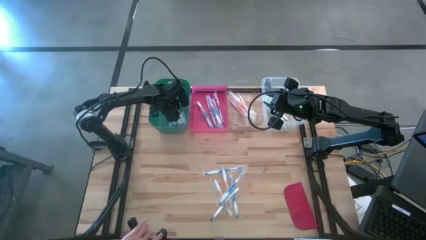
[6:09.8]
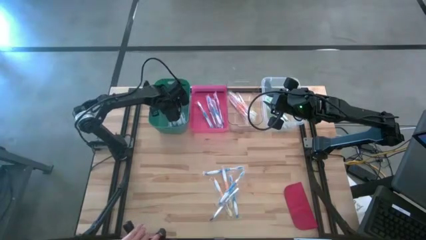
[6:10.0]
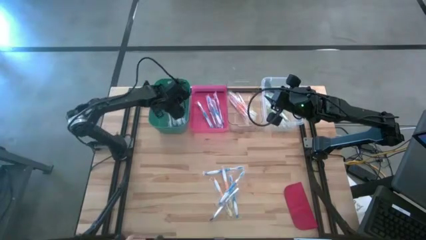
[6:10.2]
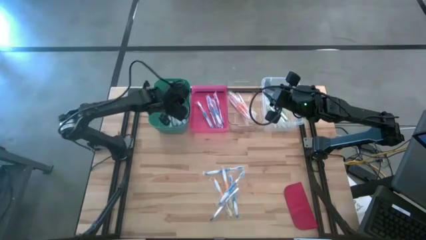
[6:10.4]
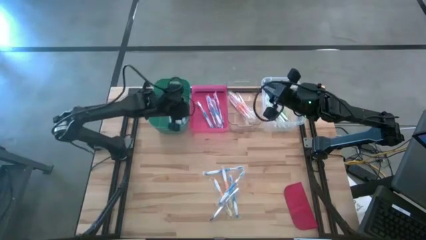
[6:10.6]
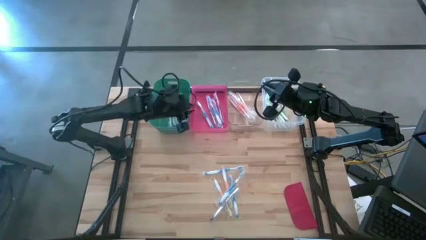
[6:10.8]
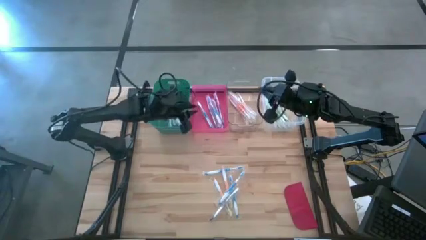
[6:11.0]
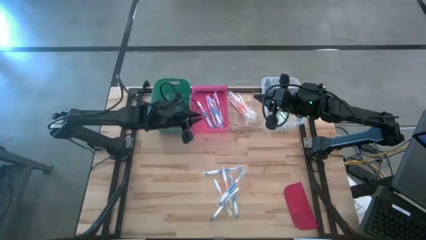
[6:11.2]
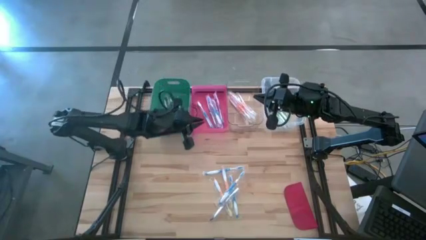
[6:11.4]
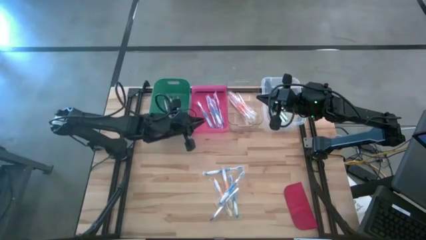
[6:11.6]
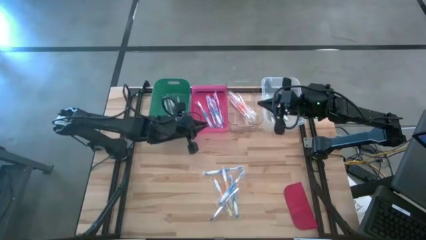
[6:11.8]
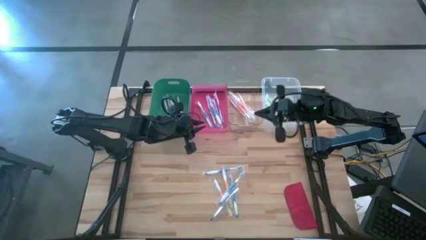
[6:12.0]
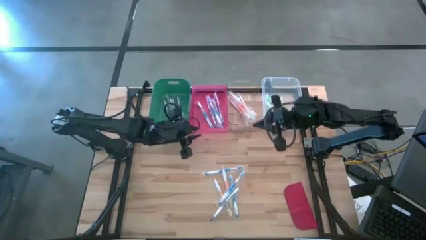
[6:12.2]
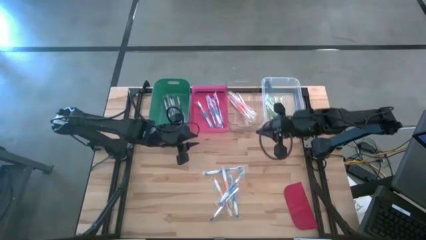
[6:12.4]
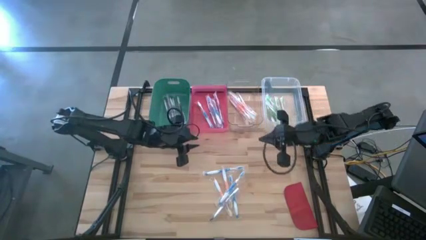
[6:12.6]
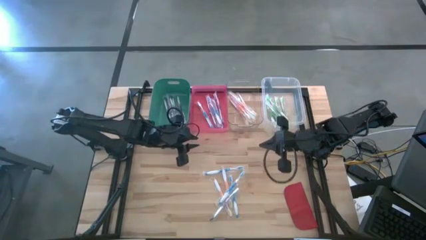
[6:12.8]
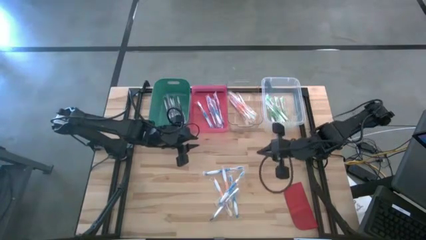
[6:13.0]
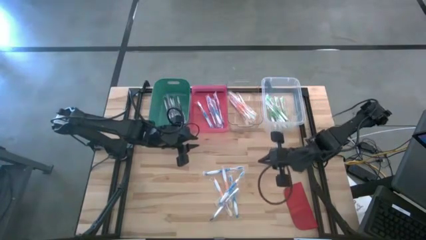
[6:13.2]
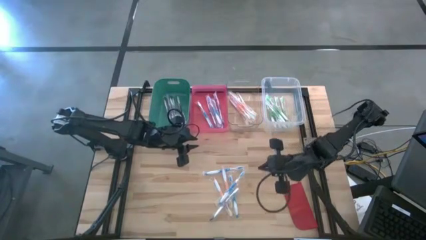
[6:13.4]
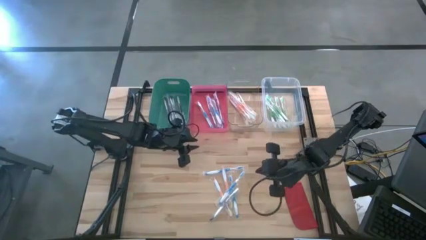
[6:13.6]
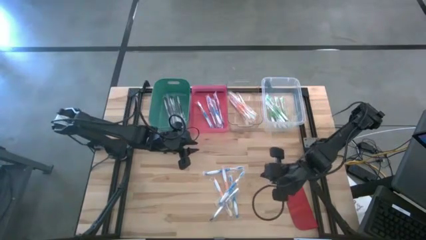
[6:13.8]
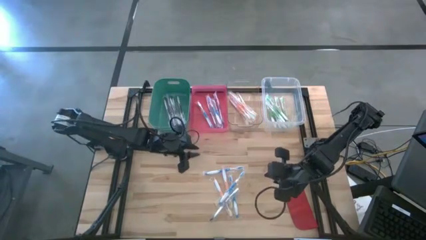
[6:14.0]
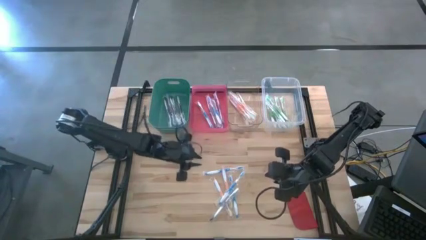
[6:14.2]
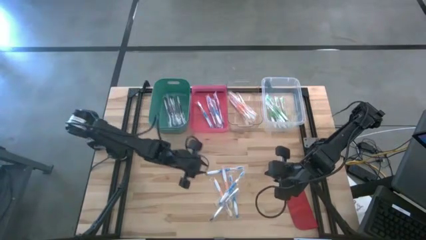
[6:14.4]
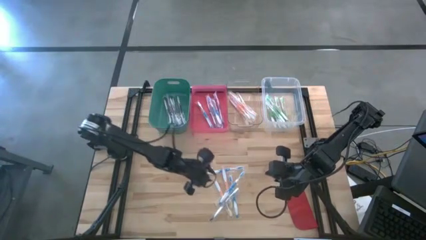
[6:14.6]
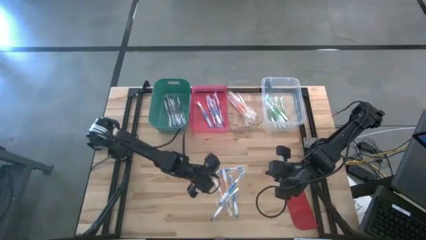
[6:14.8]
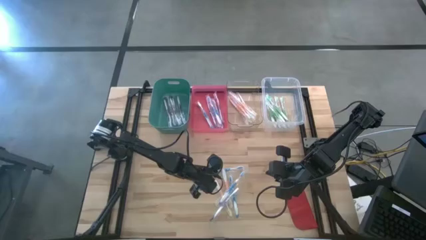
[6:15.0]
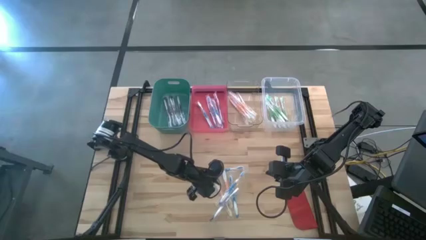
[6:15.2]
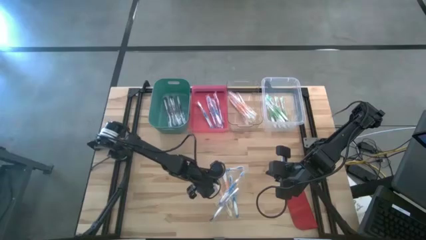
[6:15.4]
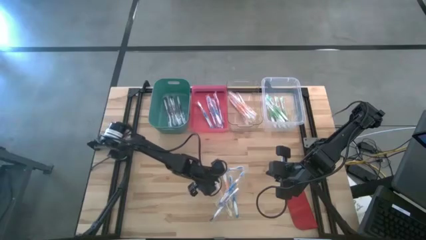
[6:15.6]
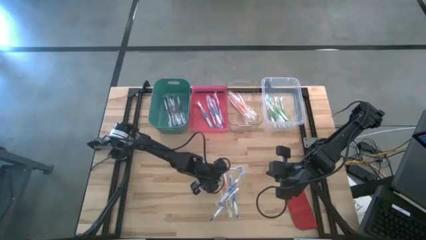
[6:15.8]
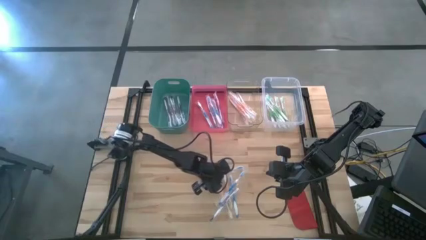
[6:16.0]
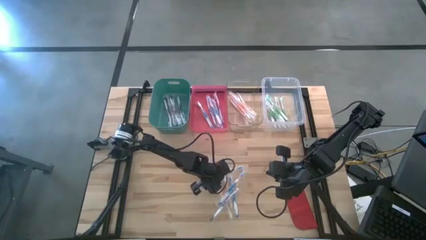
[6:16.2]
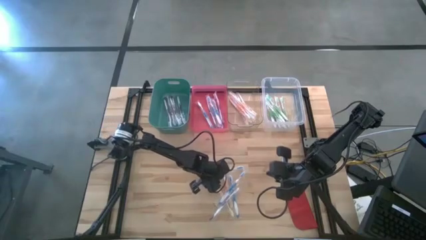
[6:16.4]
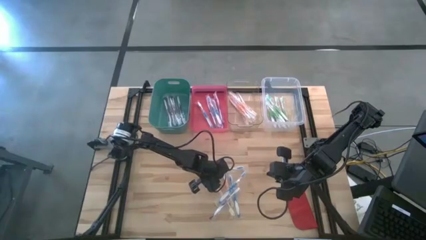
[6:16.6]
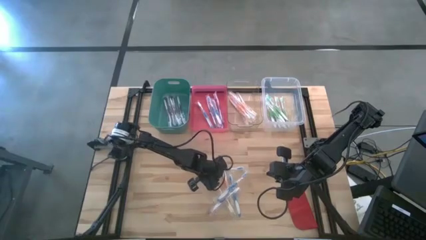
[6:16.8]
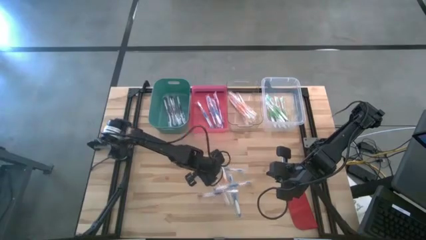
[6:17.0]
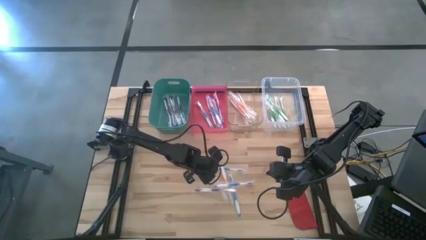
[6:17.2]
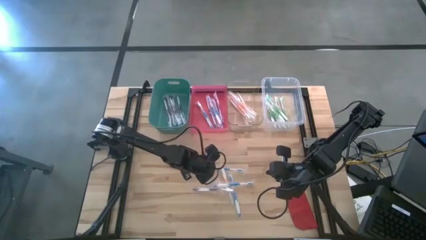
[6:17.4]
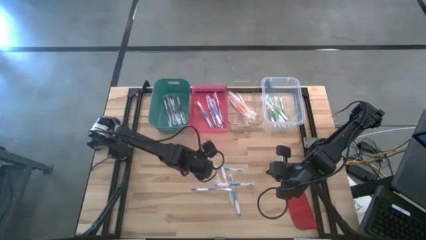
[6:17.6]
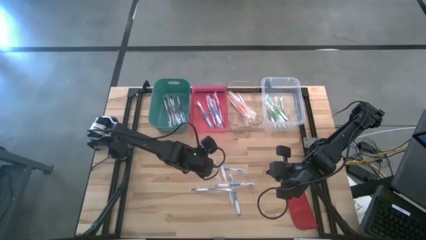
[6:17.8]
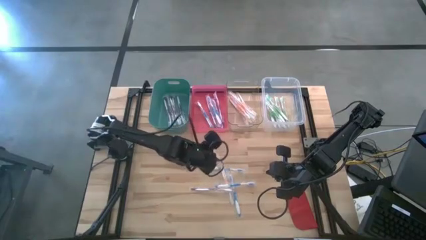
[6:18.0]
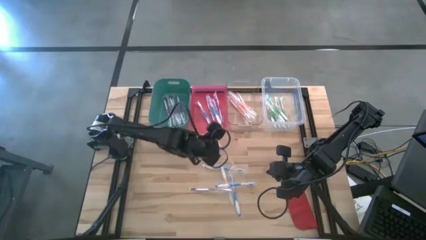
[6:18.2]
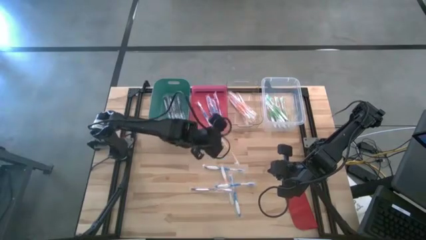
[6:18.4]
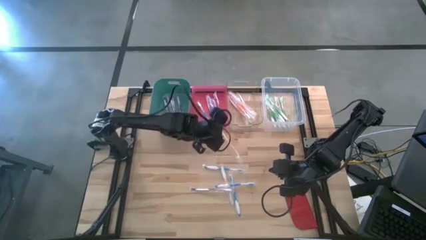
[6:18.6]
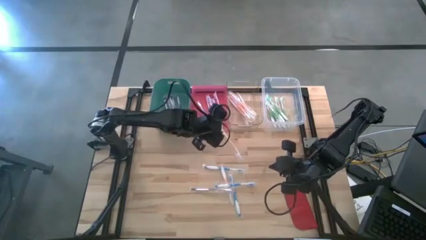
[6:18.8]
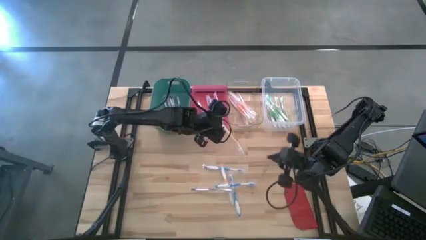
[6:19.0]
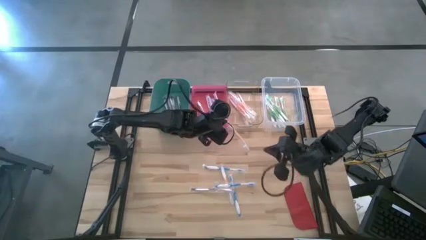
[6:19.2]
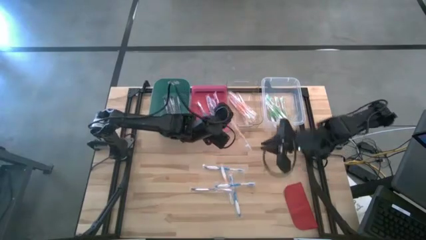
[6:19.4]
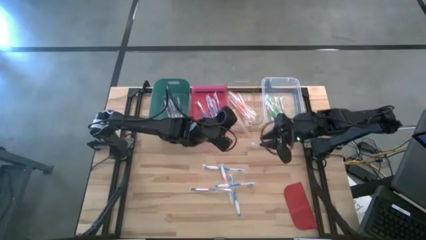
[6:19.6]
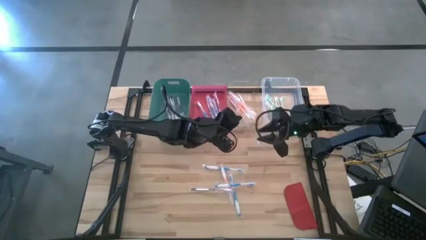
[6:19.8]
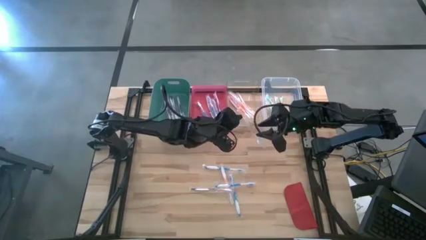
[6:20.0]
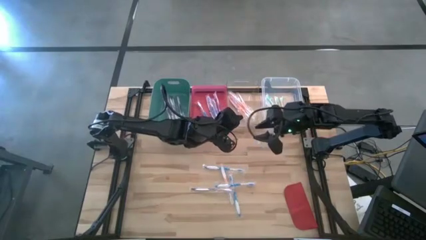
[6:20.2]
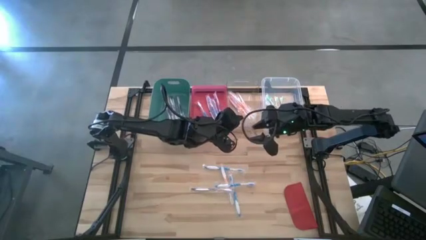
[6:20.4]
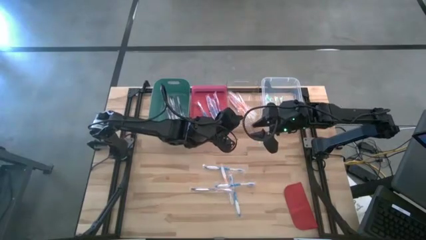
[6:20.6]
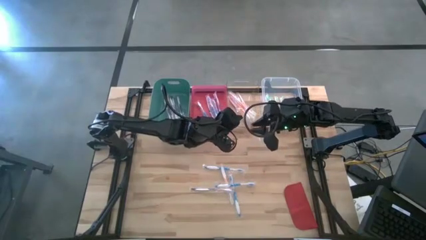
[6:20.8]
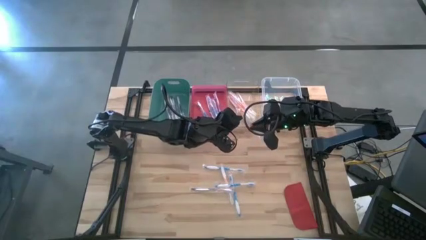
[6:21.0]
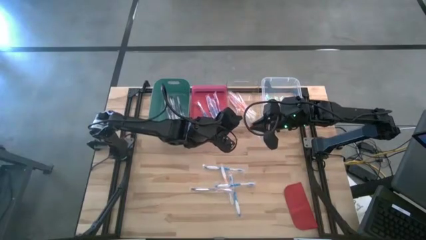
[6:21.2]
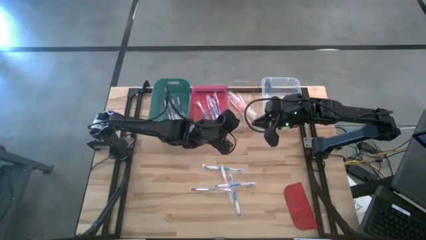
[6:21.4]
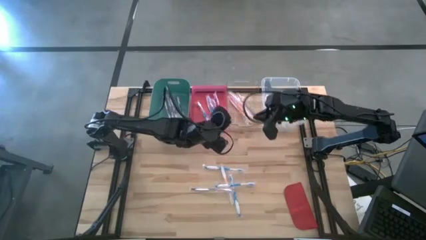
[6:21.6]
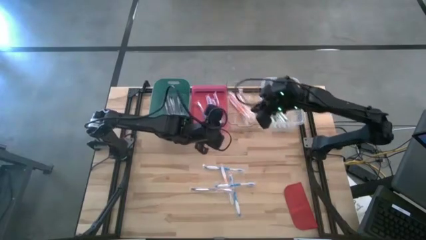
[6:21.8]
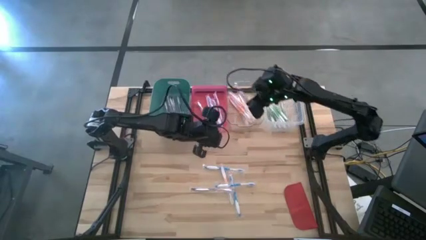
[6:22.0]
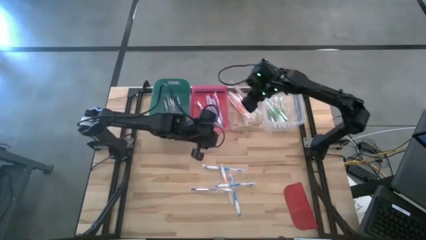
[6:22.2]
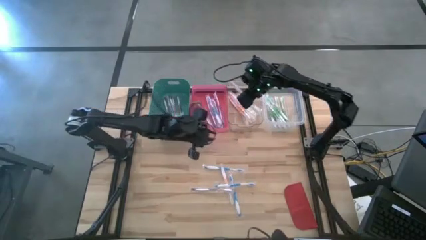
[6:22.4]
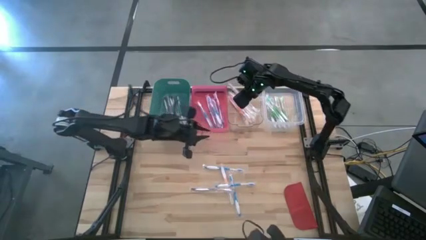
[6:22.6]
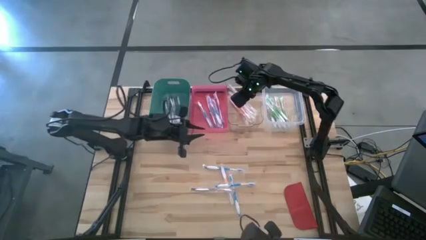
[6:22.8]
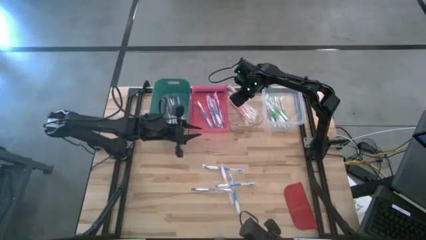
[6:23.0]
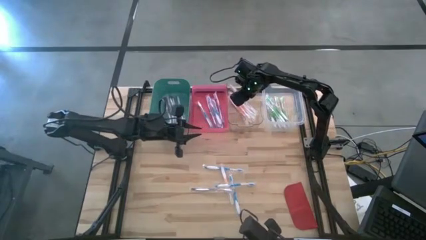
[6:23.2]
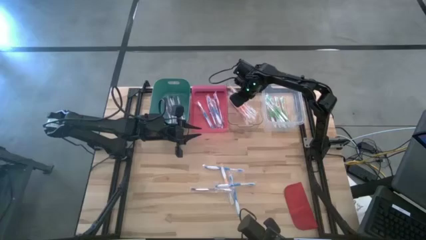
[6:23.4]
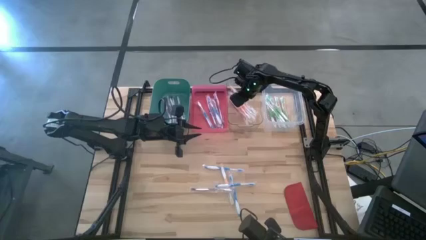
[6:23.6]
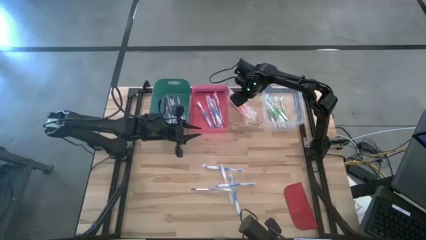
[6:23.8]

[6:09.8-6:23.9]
Task: Pick & Place Toothbrushes
Put the orange toothbrush into the transparent bin

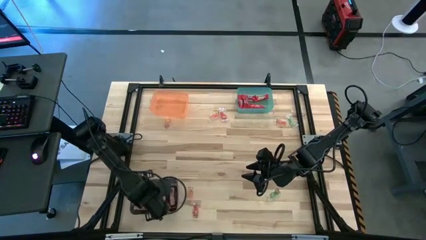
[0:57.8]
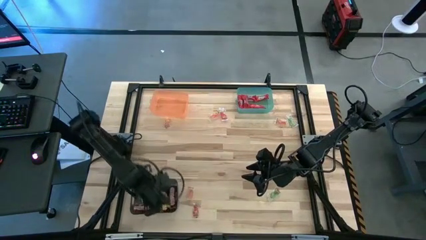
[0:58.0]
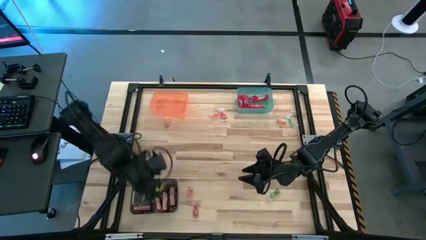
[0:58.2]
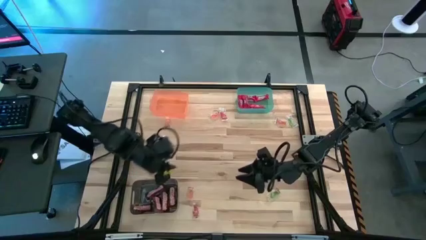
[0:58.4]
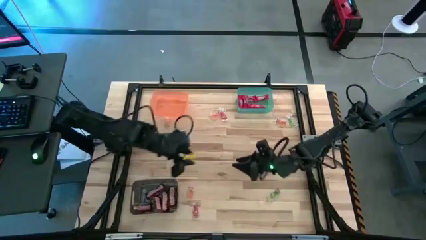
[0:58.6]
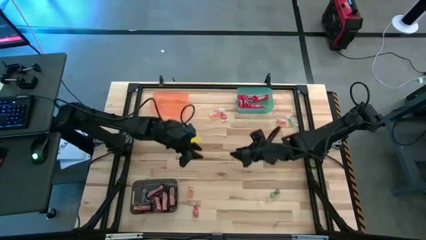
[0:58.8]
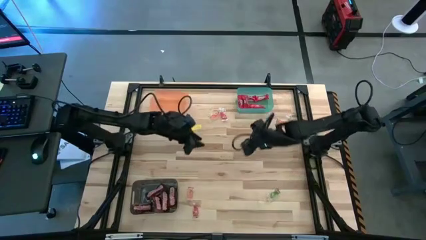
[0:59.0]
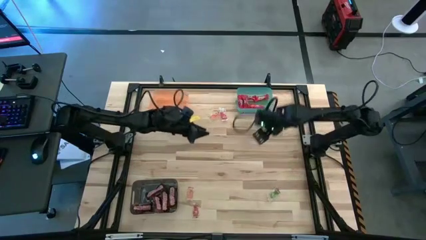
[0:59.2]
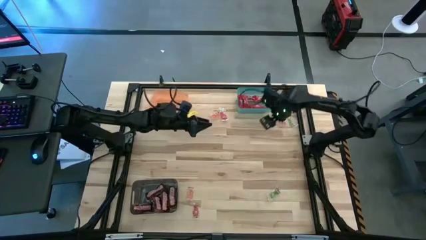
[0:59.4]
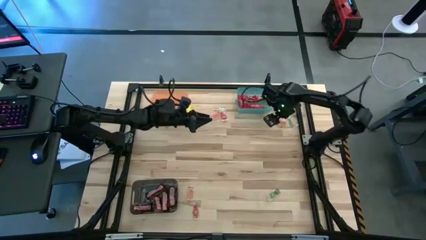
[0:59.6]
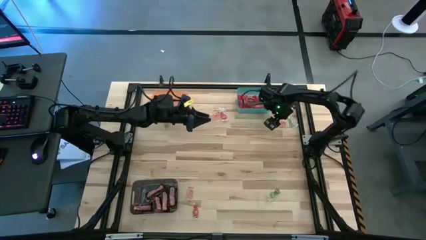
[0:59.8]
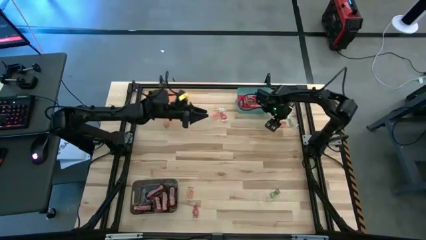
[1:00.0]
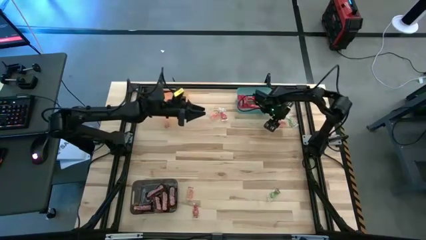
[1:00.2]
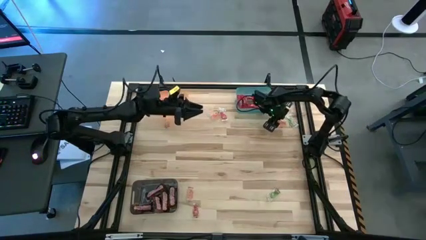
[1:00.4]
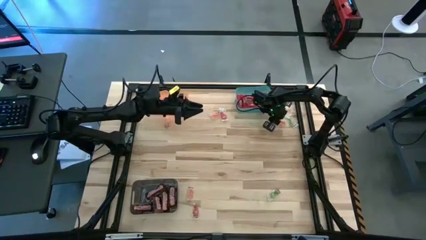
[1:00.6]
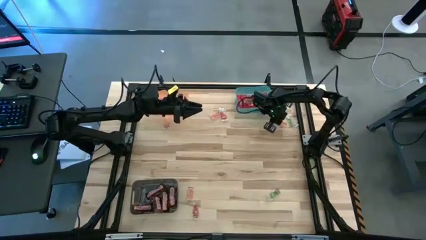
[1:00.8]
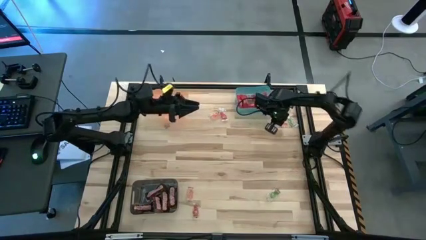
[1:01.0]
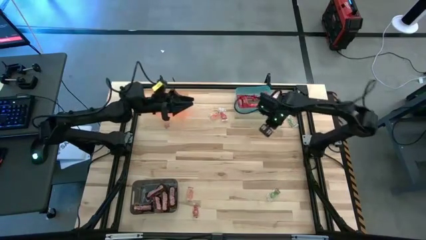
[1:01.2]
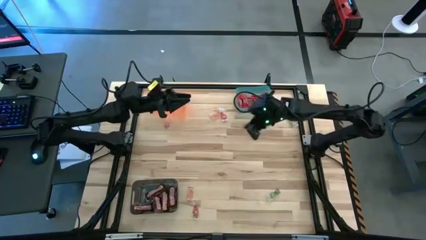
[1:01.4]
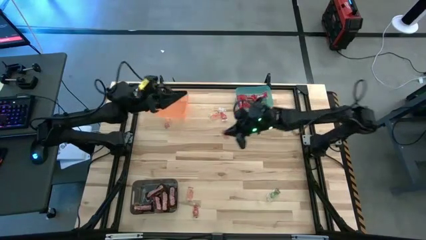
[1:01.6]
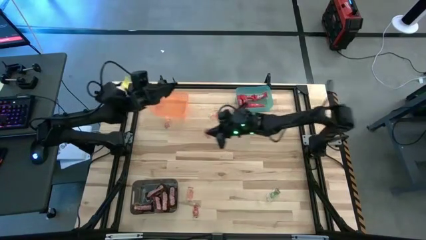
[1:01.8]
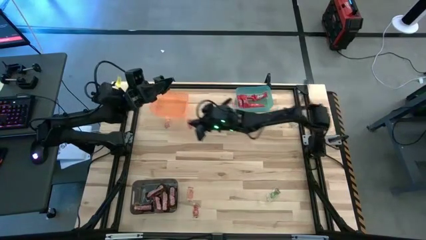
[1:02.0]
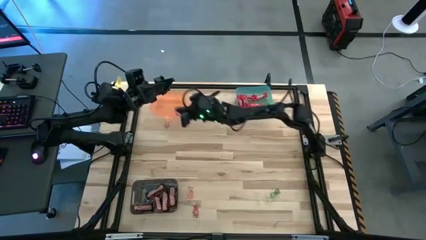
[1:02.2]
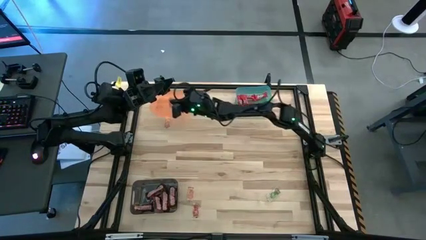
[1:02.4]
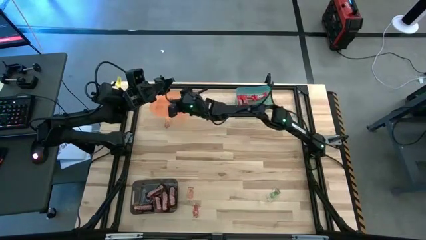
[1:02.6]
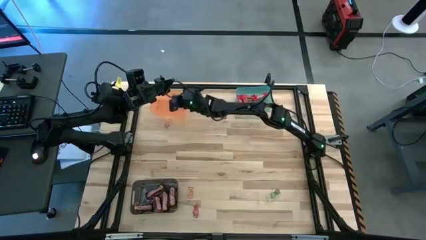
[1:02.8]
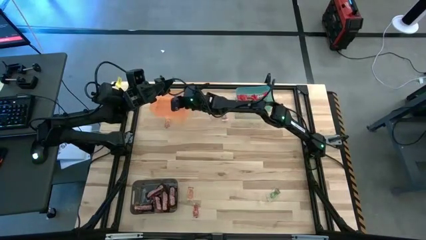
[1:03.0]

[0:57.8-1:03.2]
Task: Sort candy by brand, put in halloween buckets
Put the orange gummy into the orange bin
